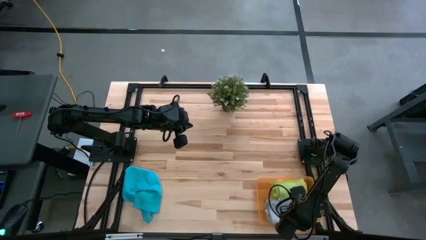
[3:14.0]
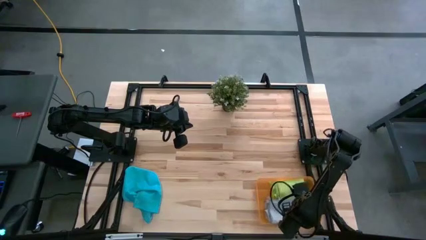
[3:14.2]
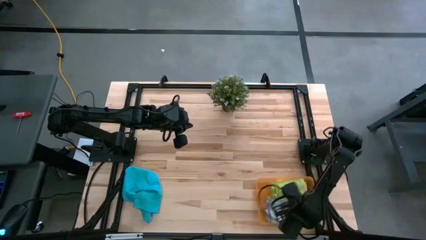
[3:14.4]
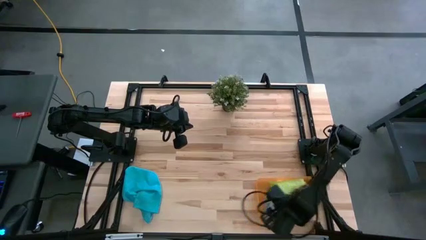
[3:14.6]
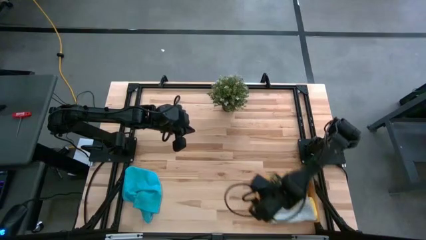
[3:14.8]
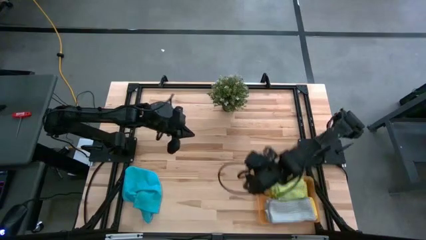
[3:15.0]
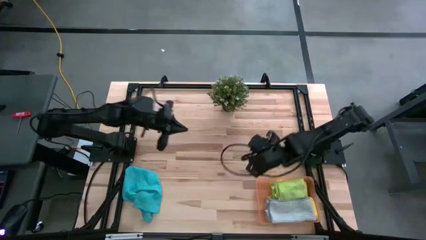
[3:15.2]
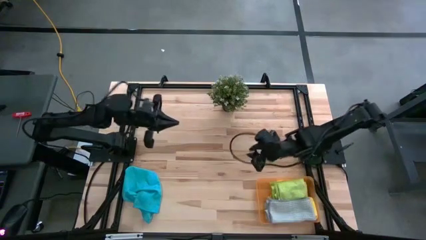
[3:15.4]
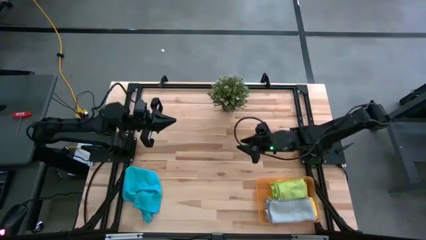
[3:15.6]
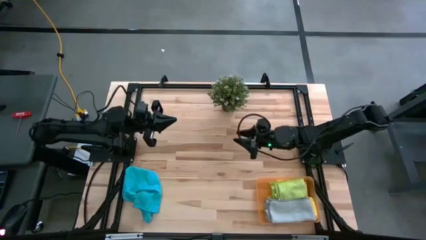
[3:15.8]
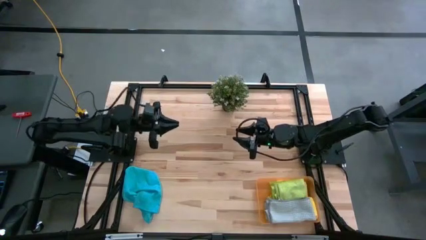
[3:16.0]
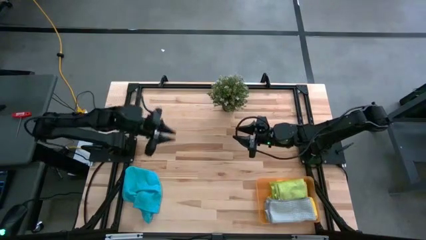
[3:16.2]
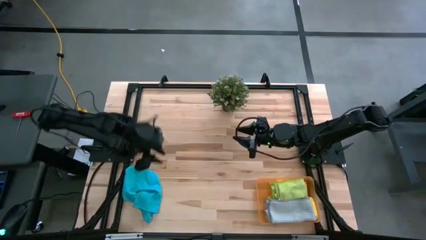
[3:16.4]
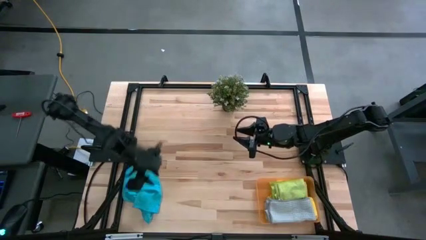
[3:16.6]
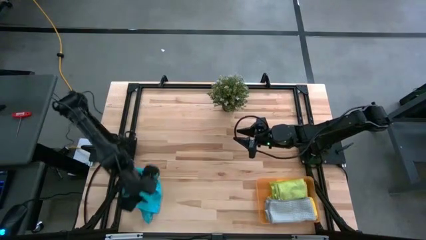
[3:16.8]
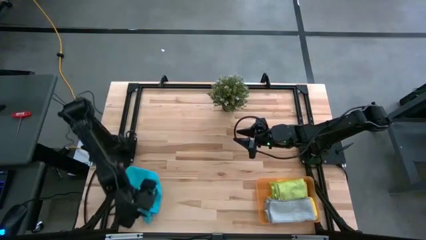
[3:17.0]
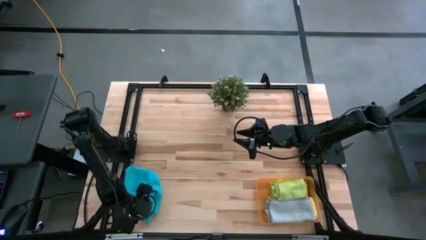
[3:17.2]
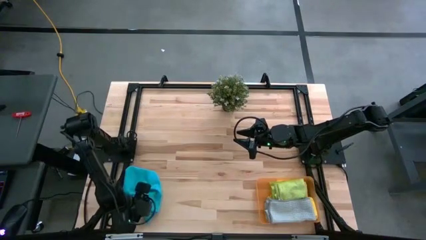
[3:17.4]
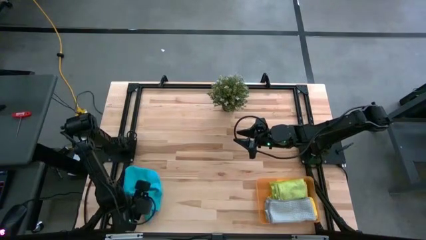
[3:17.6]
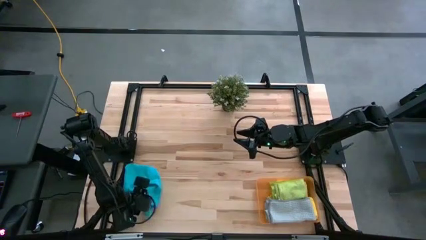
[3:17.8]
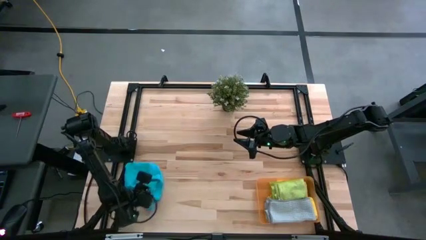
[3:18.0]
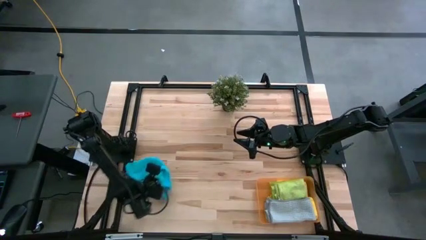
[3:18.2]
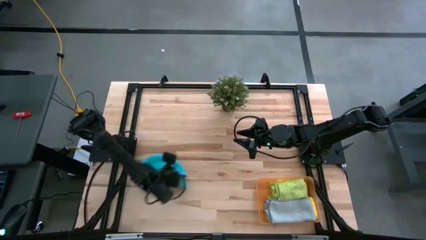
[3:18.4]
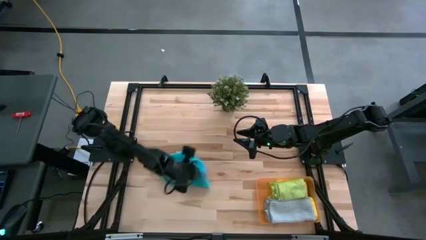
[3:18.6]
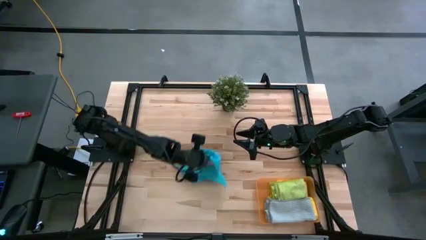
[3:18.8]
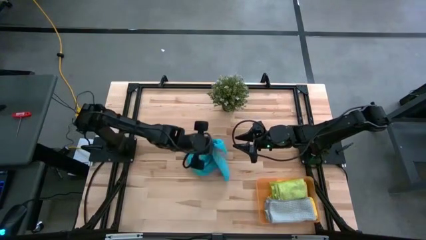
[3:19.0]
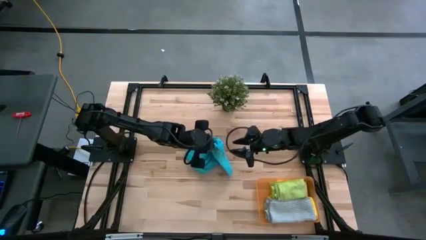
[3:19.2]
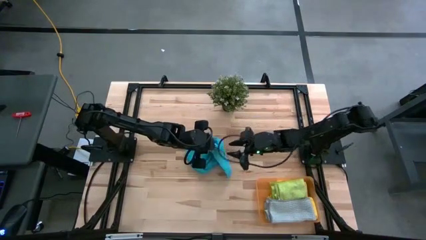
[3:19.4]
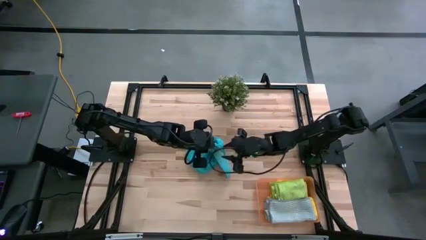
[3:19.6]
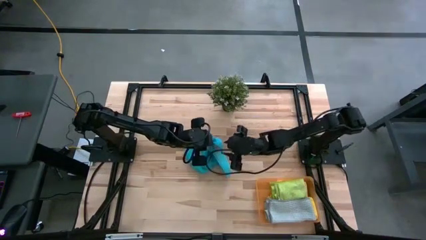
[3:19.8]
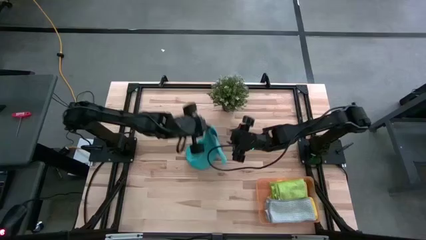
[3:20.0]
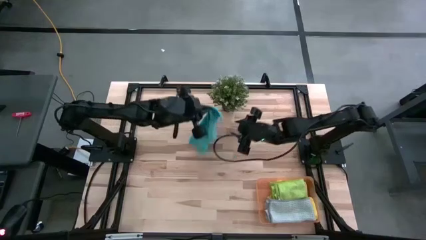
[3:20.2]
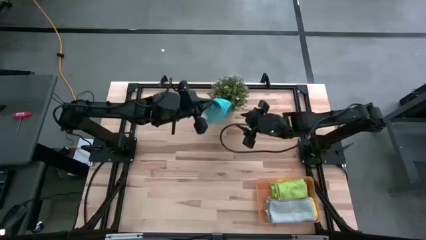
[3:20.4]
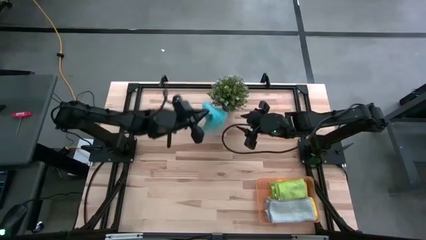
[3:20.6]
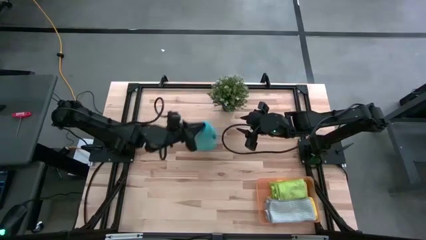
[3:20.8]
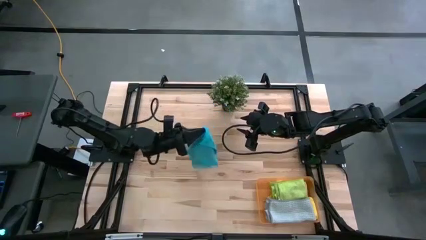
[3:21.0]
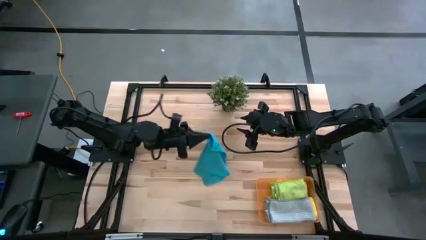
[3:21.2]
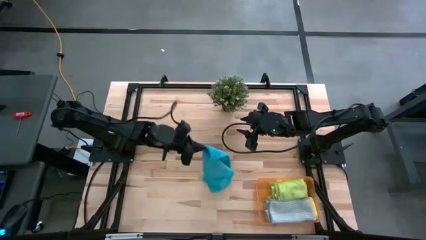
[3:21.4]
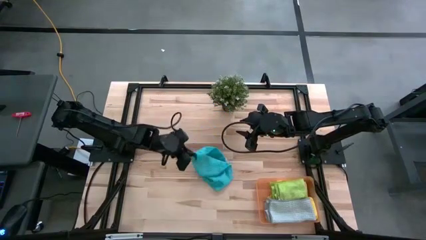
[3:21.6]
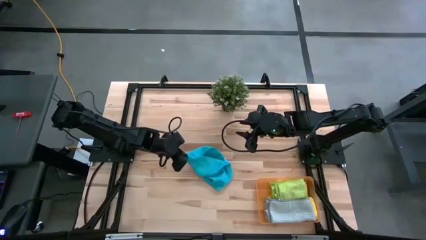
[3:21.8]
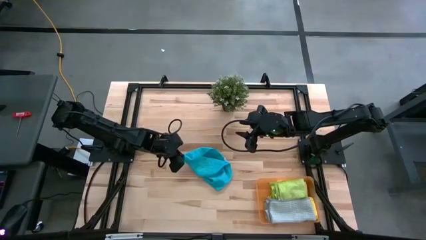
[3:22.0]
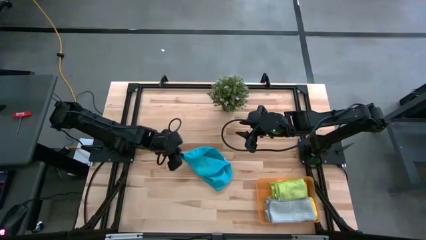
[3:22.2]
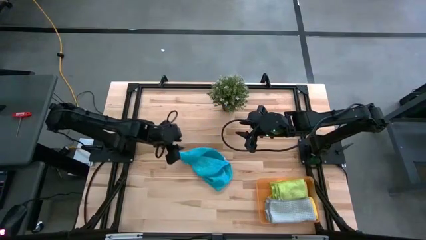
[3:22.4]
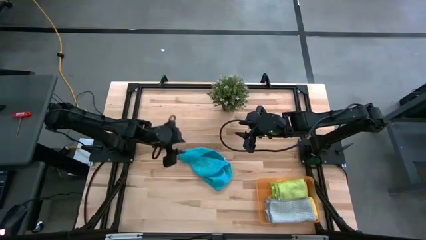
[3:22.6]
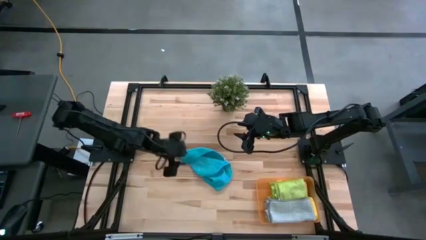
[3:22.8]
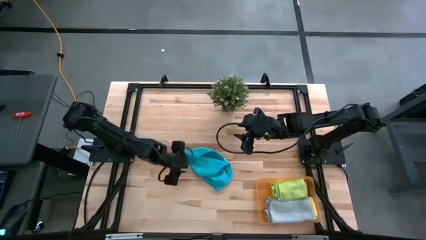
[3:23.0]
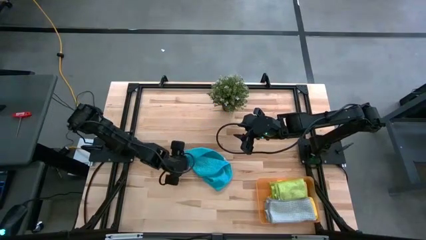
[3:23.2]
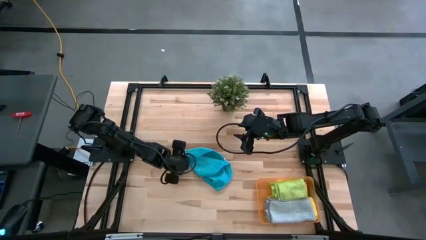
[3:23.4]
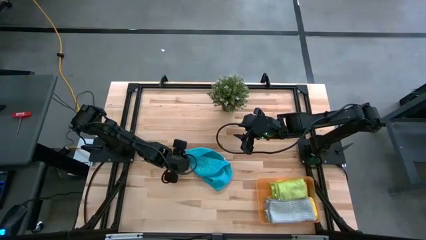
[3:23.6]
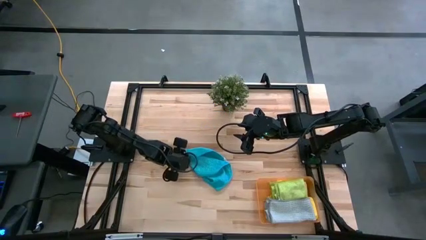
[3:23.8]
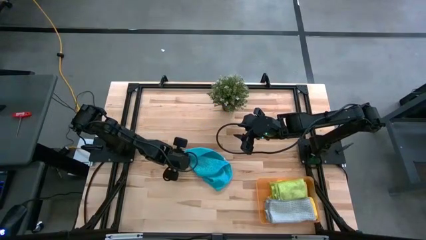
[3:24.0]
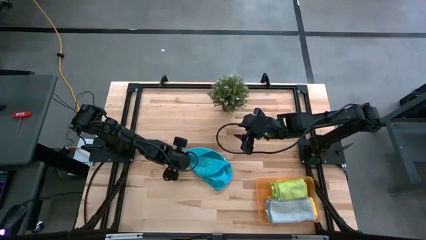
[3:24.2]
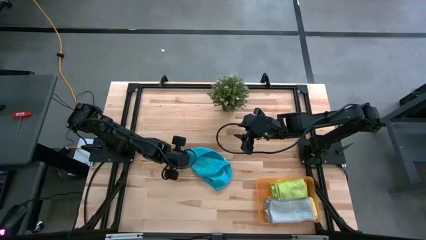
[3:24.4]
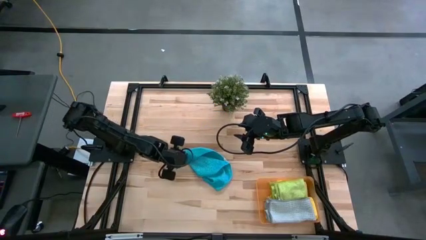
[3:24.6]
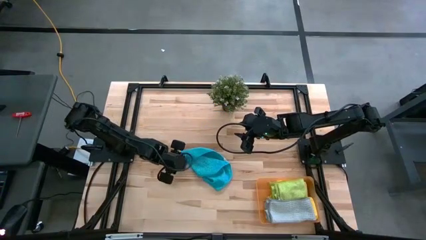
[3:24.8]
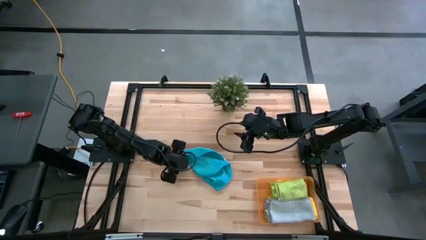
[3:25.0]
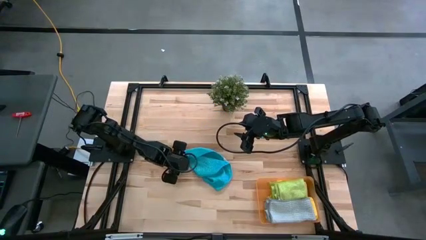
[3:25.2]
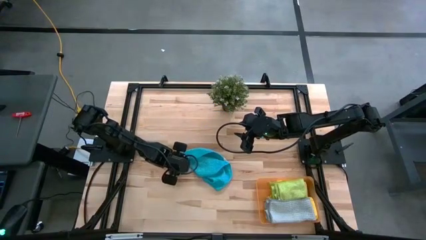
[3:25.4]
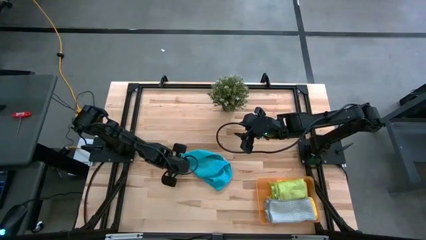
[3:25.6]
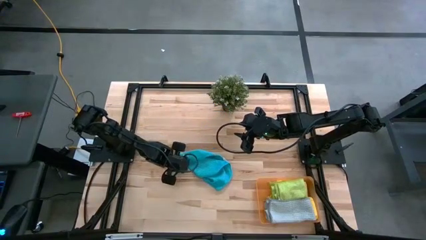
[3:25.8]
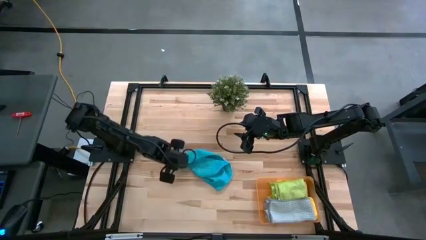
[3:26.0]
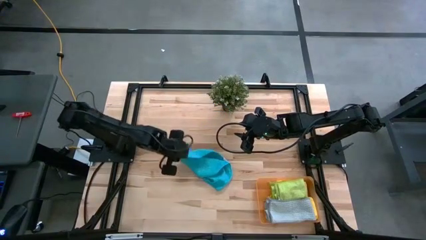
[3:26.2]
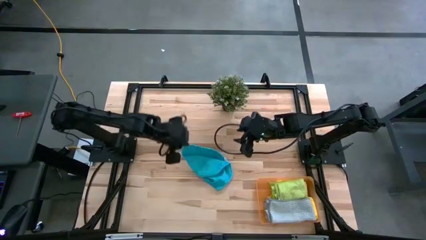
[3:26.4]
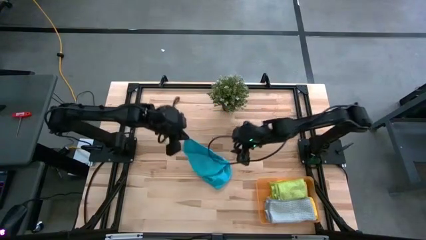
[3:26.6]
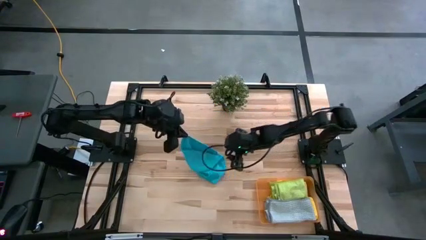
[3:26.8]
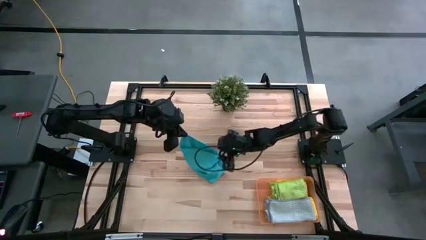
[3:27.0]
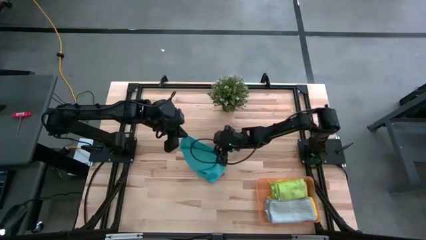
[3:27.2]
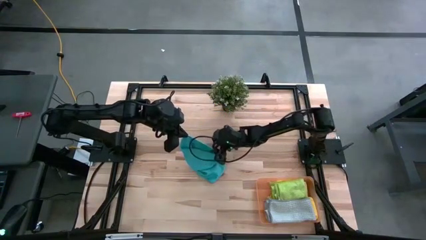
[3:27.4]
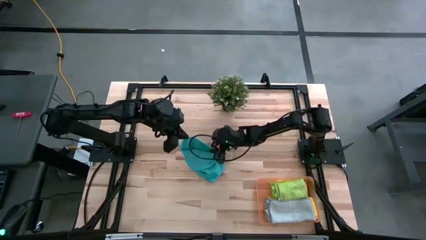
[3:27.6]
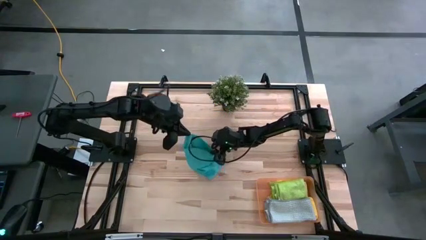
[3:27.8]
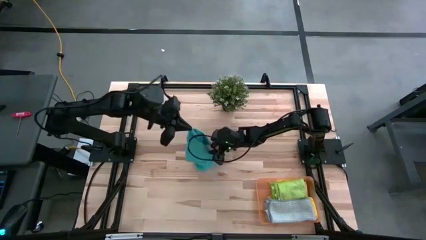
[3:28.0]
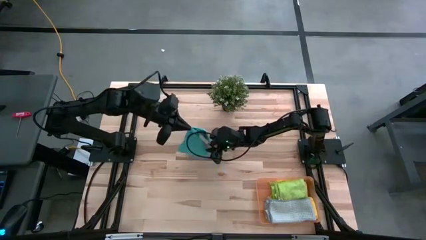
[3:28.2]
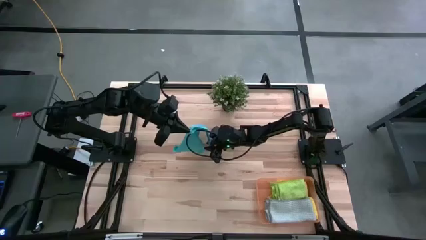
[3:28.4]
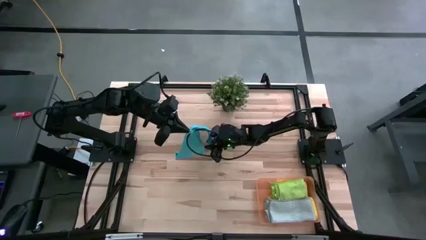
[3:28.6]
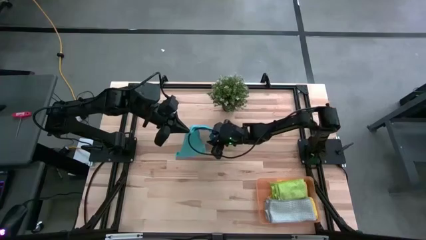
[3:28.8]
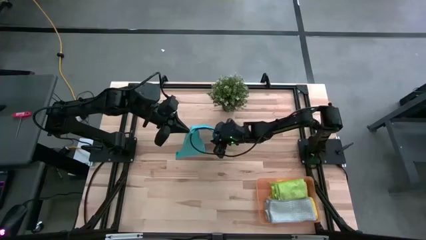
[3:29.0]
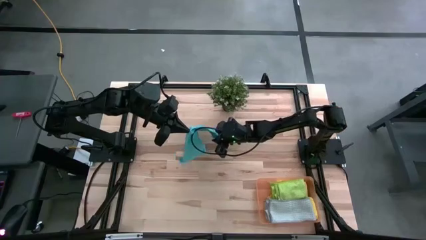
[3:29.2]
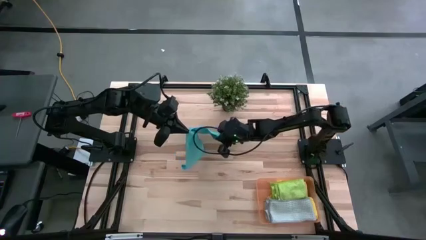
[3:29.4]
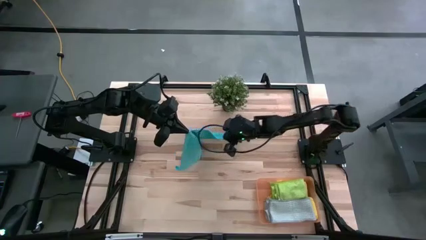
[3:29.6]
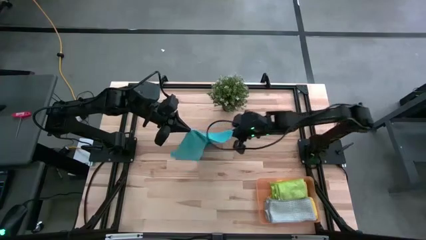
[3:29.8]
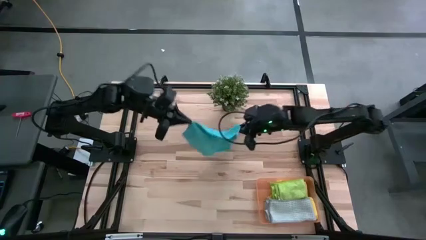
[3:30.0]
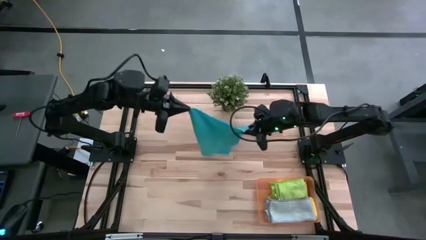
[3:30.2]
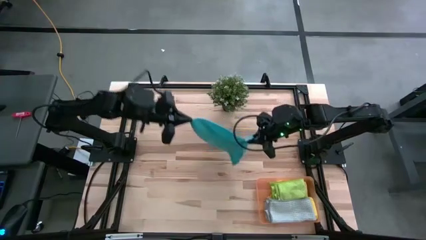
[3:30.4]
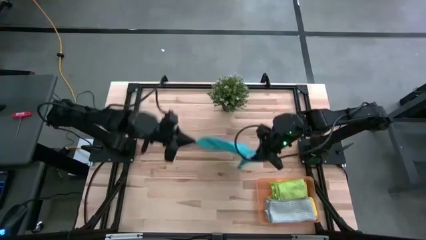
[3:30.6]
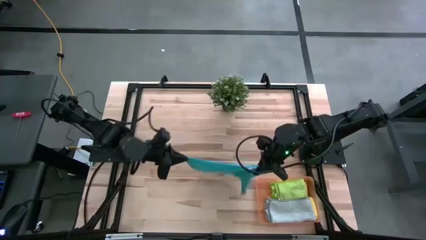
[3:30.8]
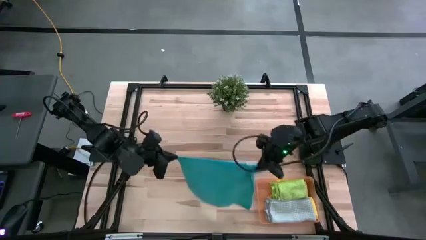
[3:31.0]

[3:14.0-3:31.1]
Task: Fold microfiber towels
Fold the blue microfiber towel
